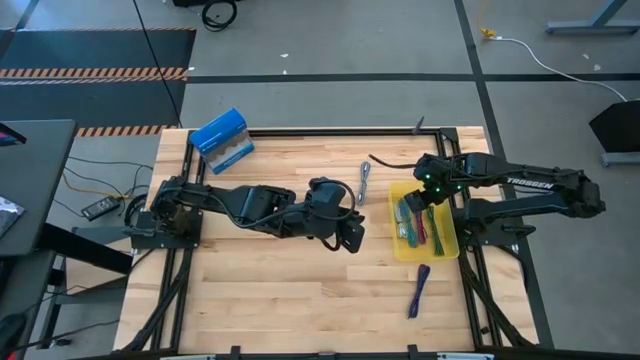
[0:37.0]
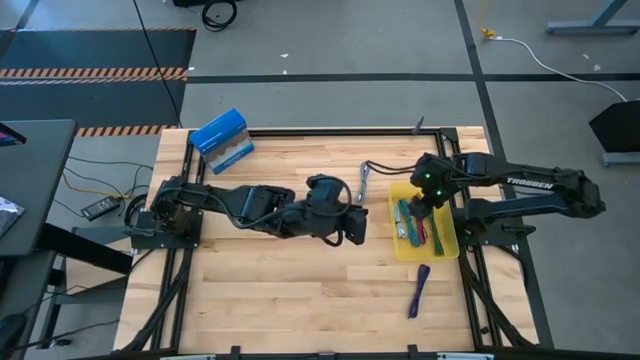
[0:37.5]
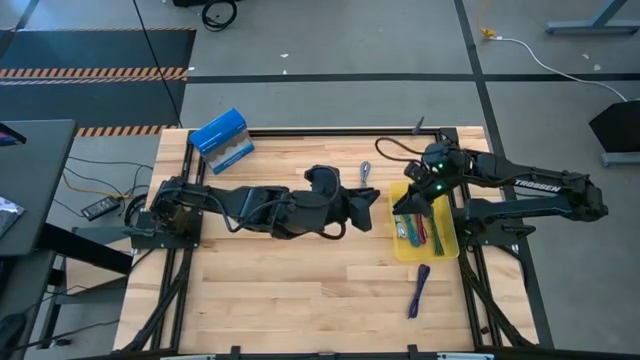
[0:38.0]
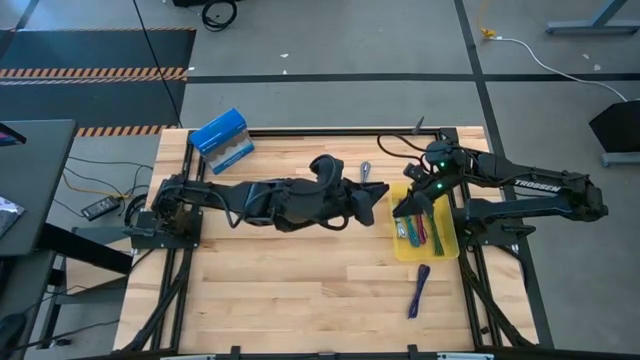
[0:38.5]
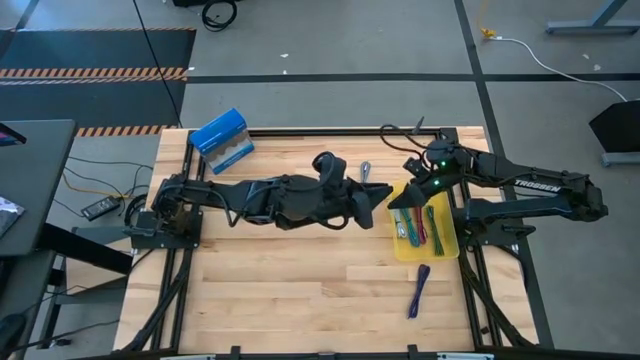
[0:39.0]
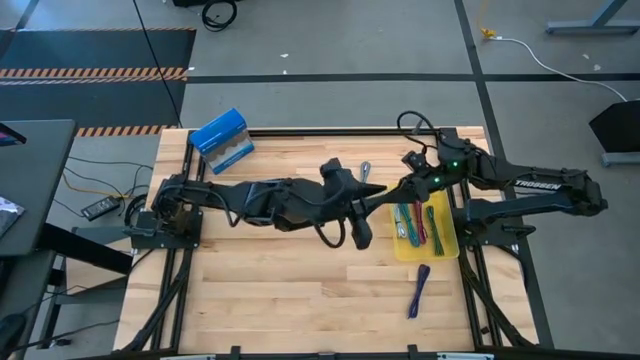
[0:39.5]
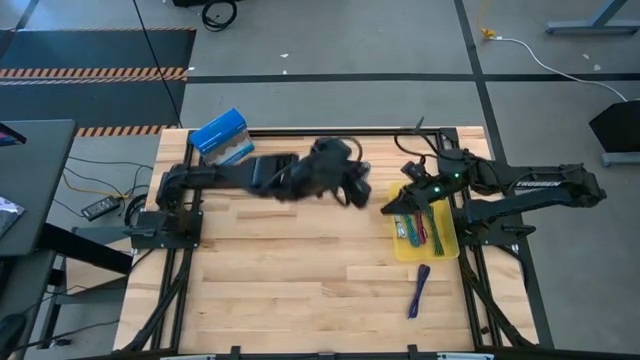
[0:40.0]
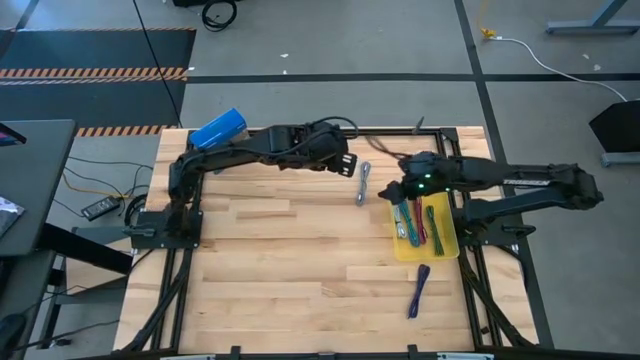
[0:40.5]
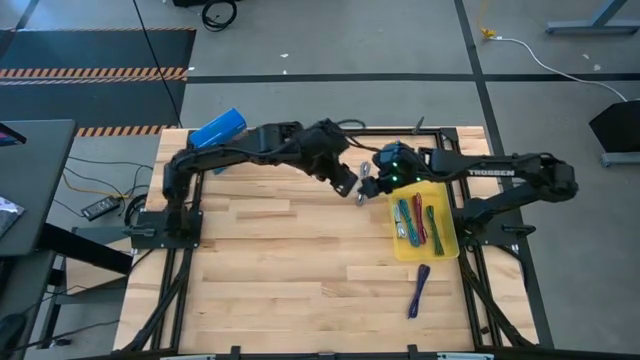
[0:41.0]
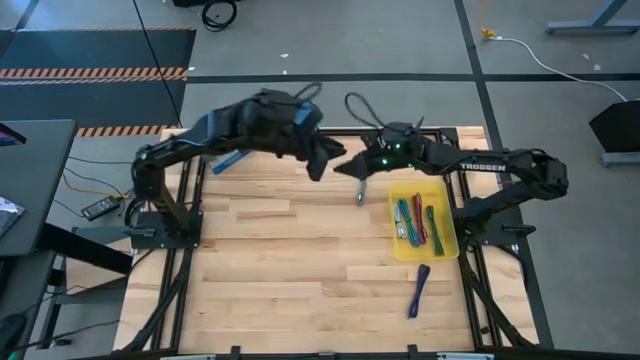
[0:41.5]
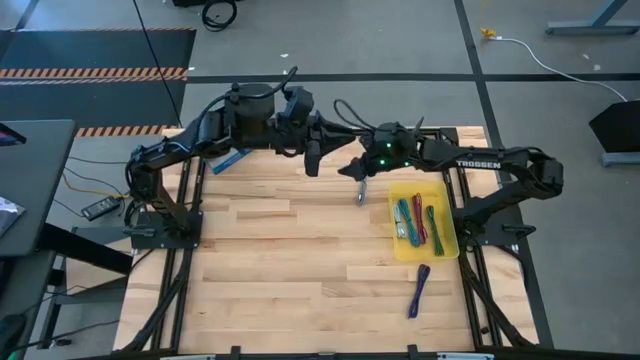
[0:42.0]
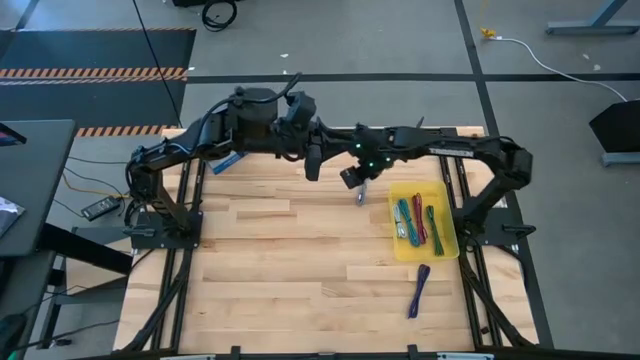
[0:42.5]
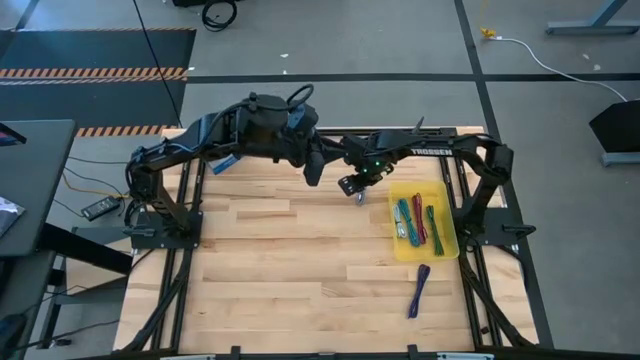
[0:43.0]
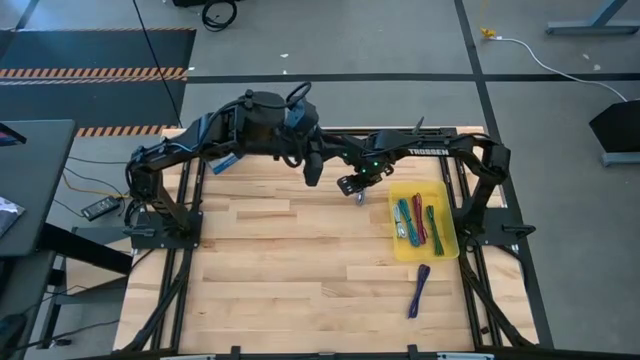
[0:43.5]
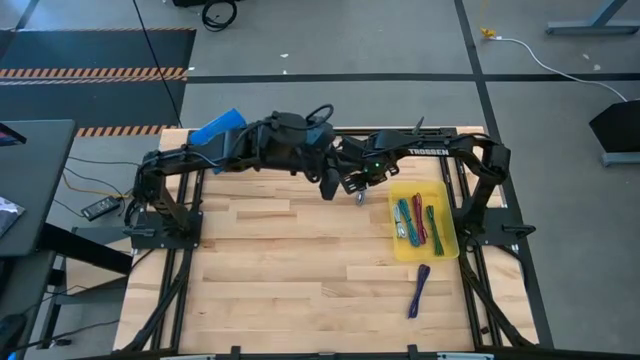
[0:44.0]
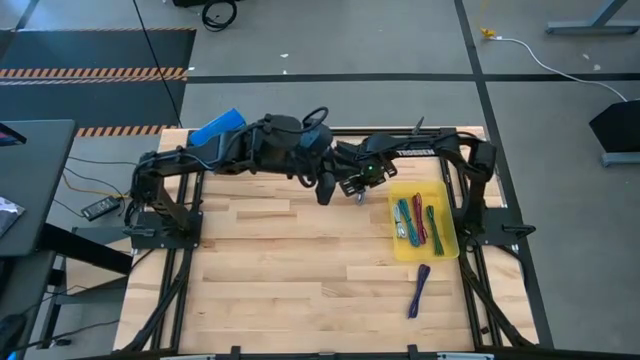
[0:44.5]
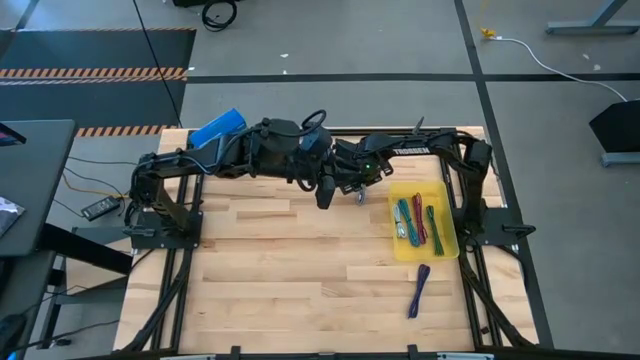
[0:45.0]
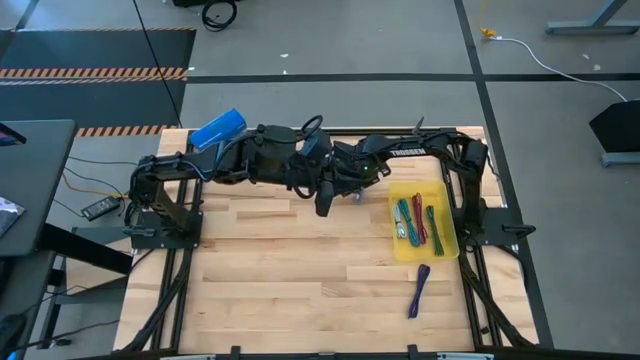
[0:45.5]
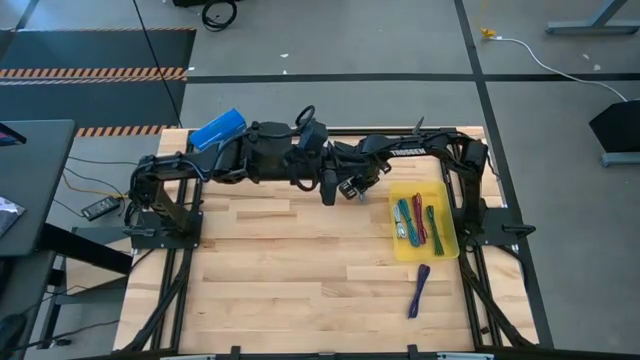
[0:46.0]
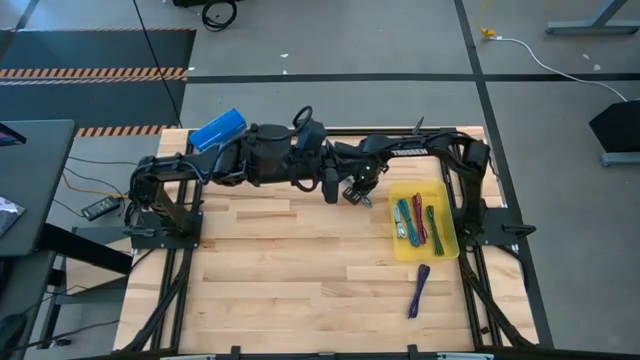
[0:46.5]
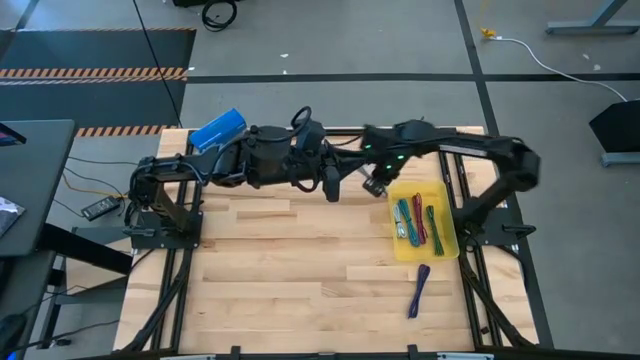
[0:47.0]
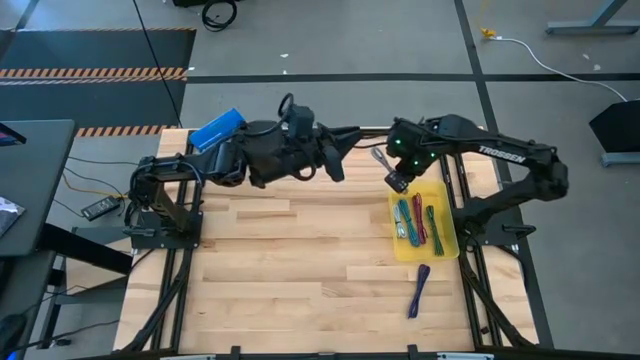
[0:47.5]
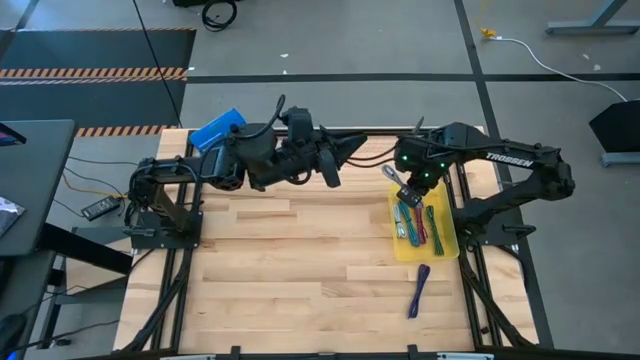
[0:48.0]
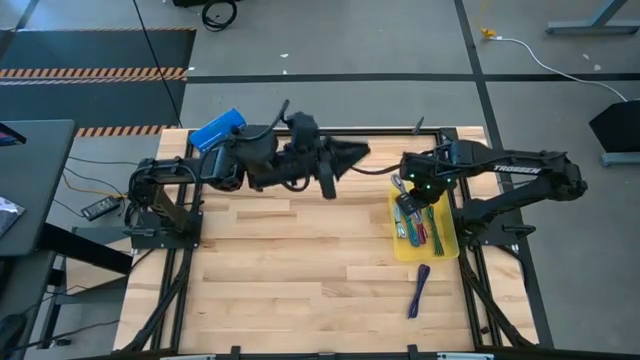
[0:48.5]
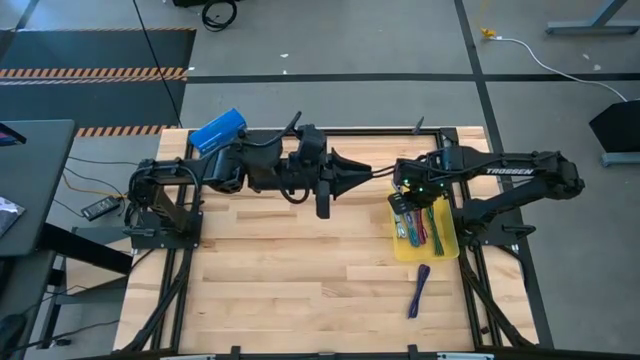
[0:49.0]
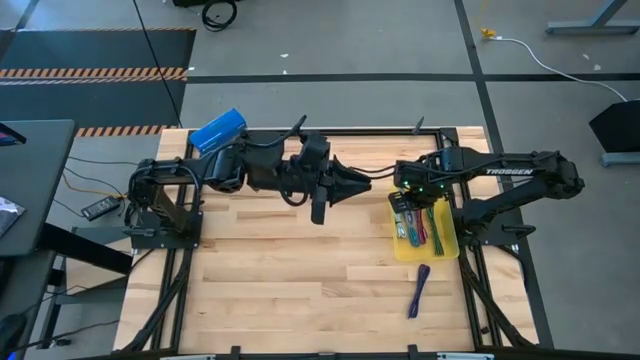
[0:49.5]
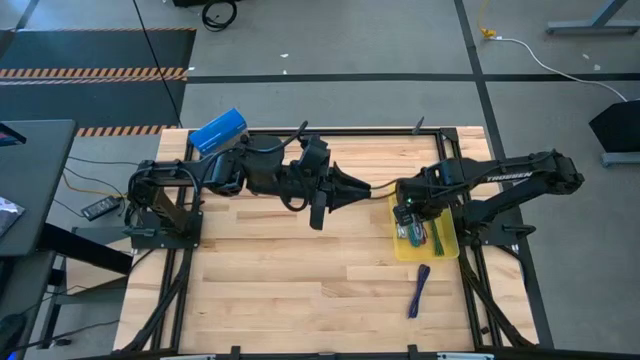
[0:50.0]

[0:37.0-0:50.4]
Task: Pick and place USB-C Cables
Put the gray USB cable into the yellow container

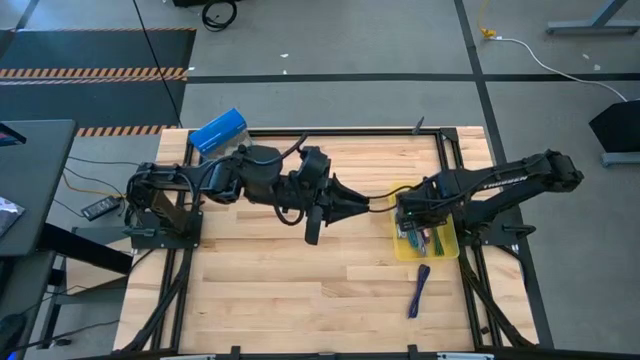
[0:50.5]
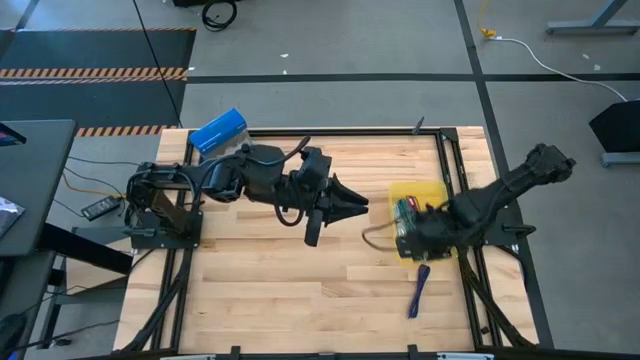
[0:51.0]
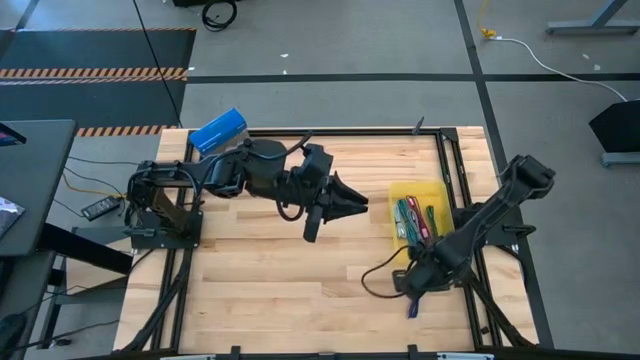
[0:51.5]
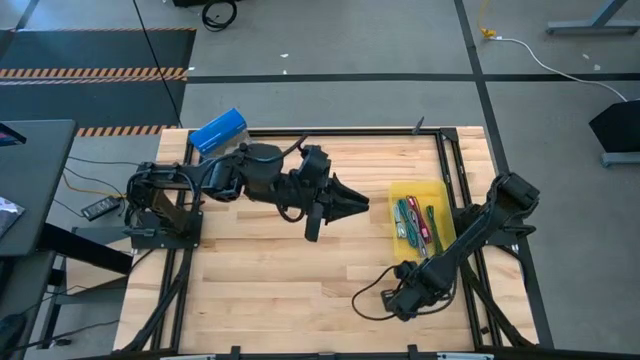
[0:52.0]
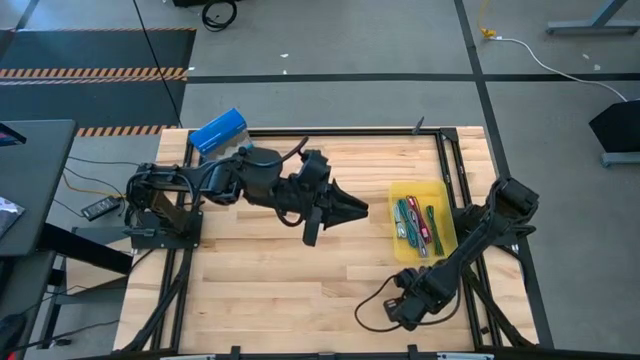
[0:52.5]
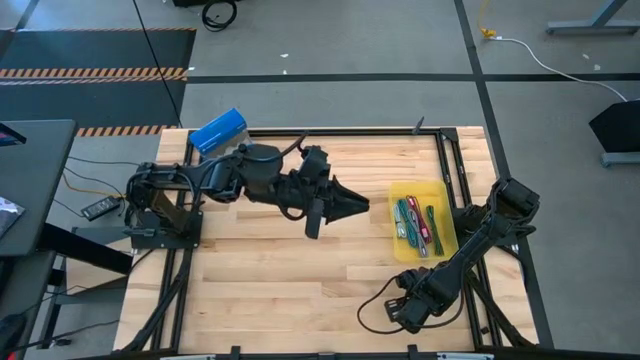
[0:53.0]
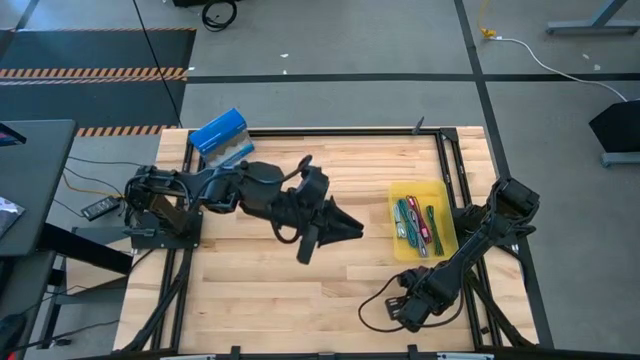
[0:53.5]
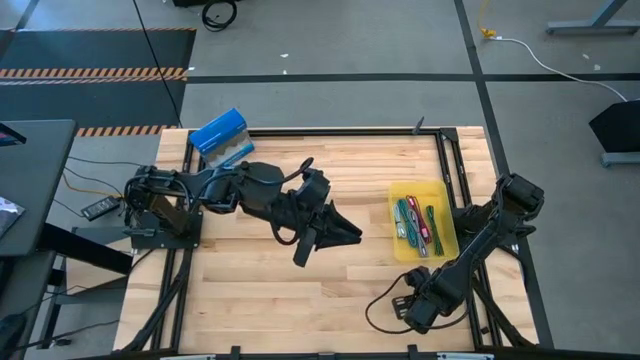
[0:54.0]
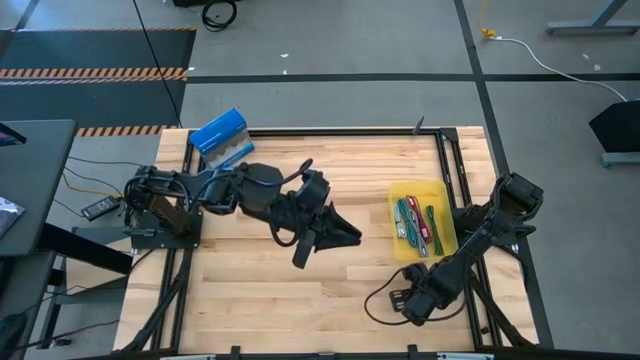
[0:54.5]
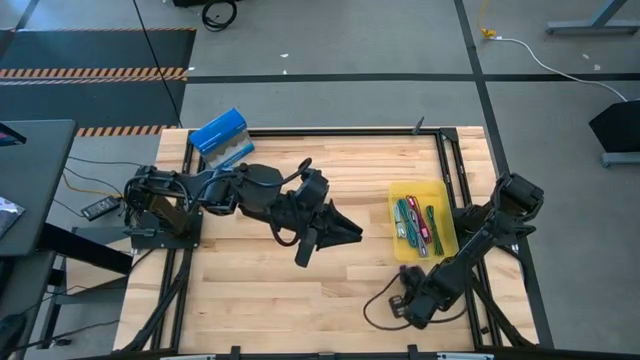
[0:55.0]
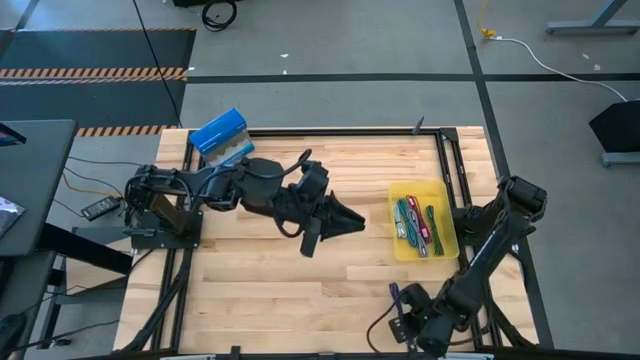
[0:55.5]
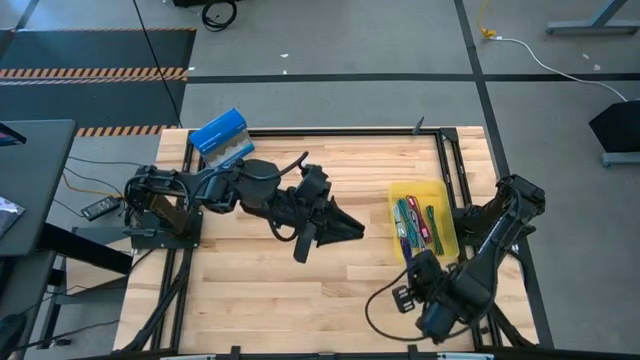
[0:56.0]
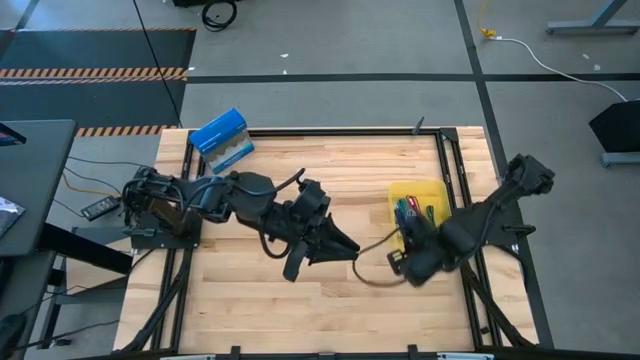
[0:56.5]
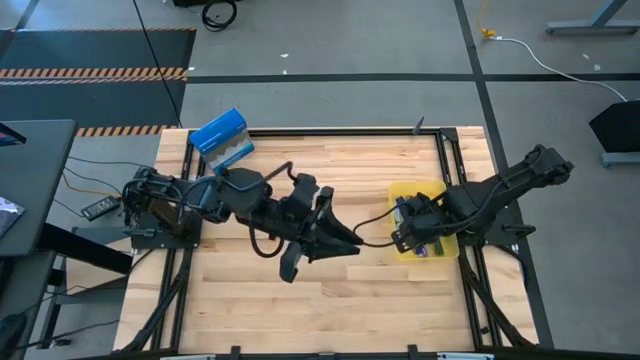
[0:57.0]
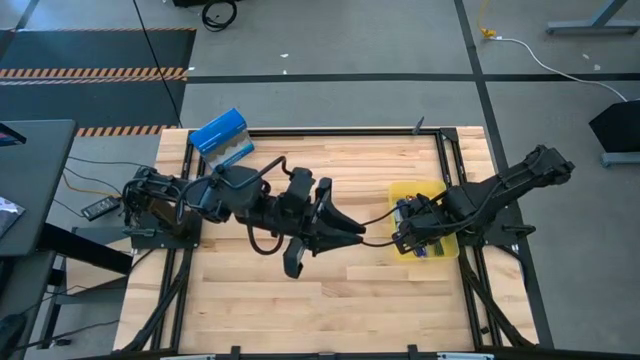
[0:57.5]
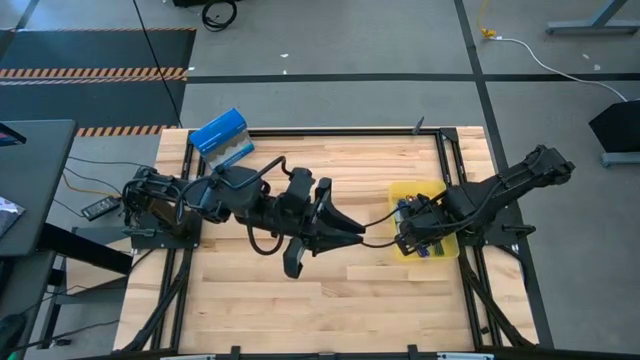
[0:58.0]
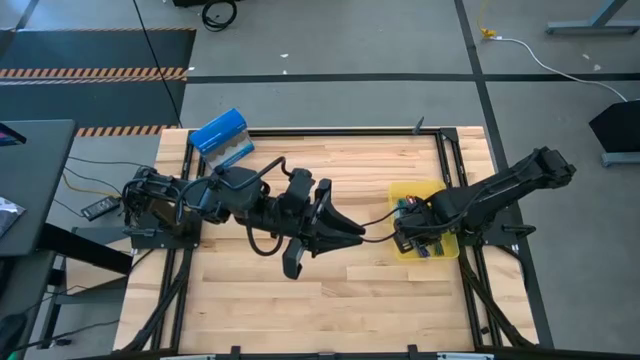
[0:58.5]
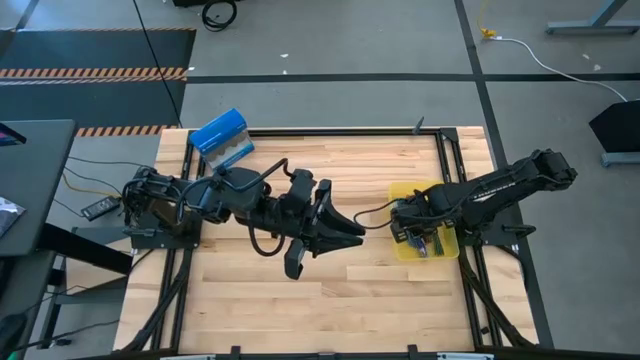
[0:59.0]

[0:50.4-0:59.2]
Put the purple USB cable into the yellow container
